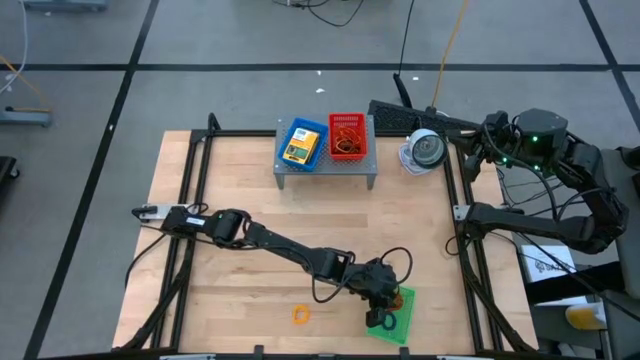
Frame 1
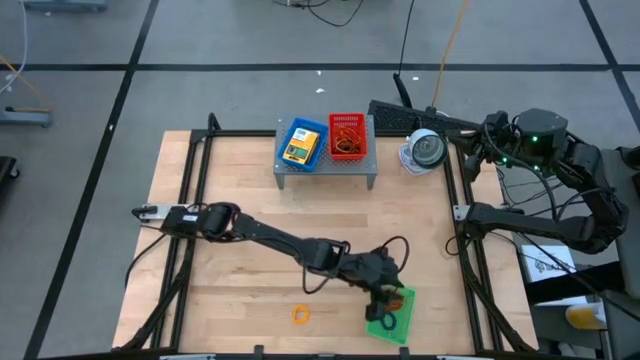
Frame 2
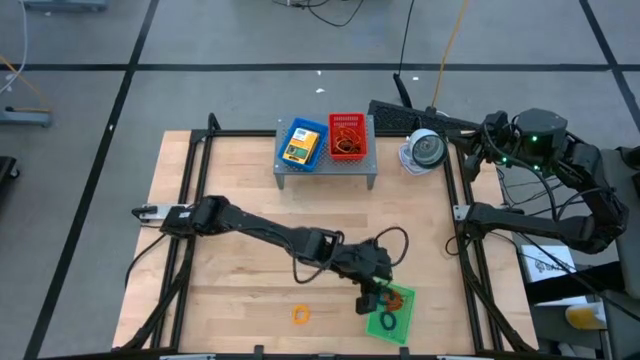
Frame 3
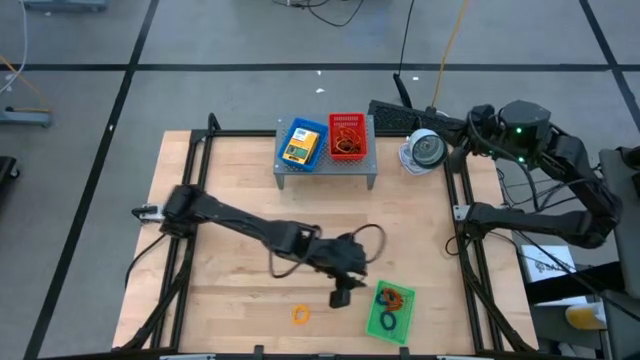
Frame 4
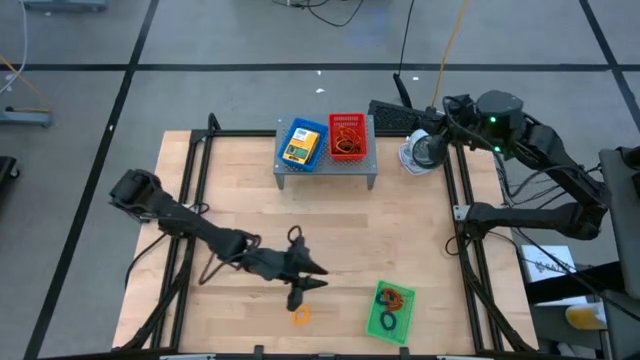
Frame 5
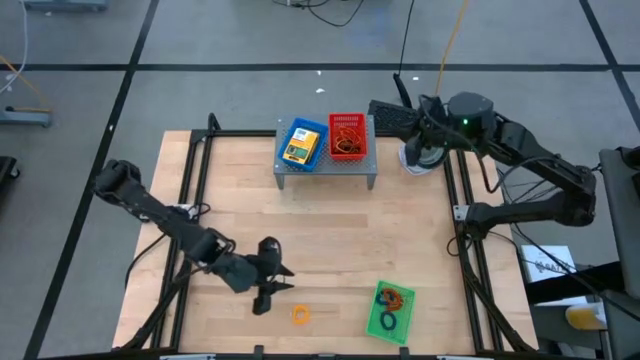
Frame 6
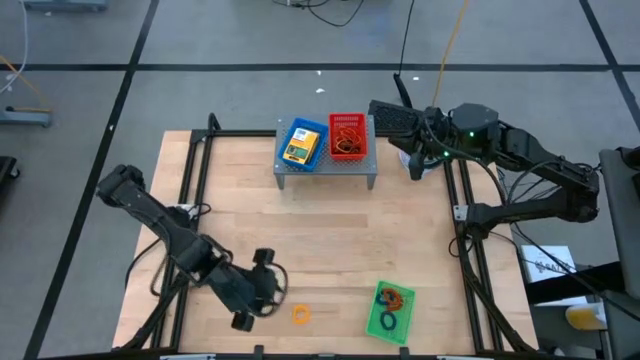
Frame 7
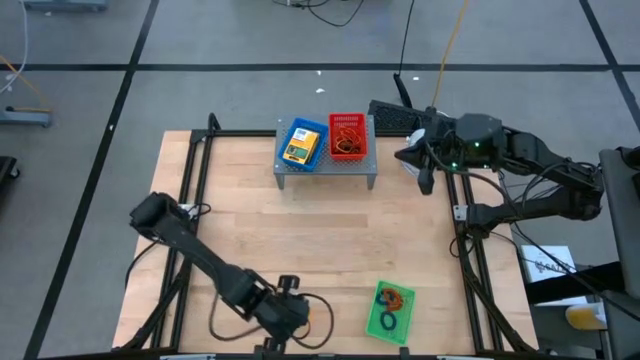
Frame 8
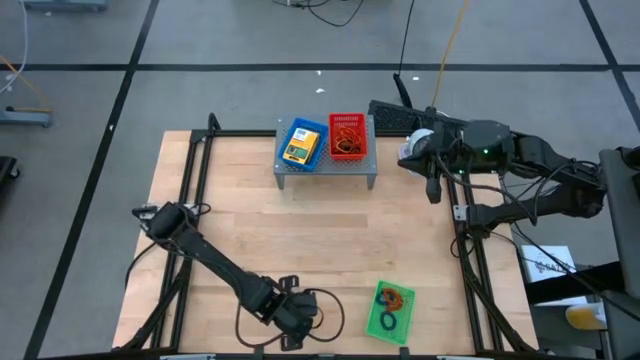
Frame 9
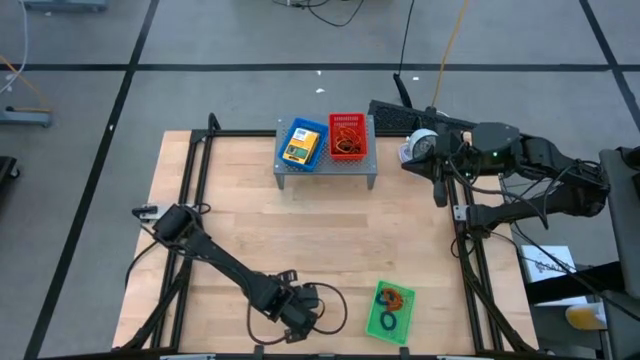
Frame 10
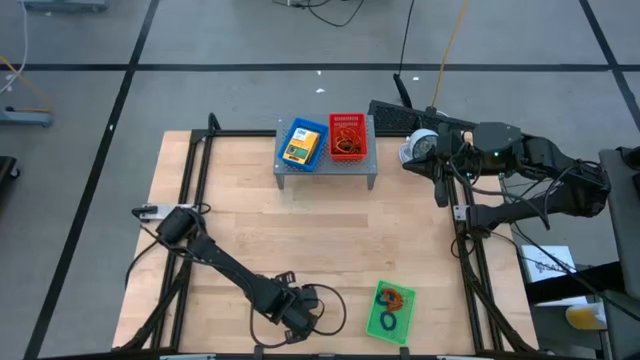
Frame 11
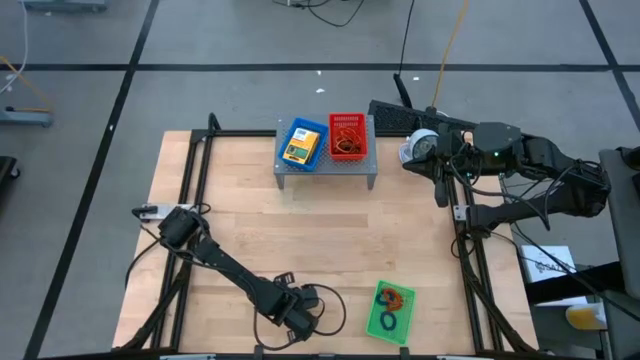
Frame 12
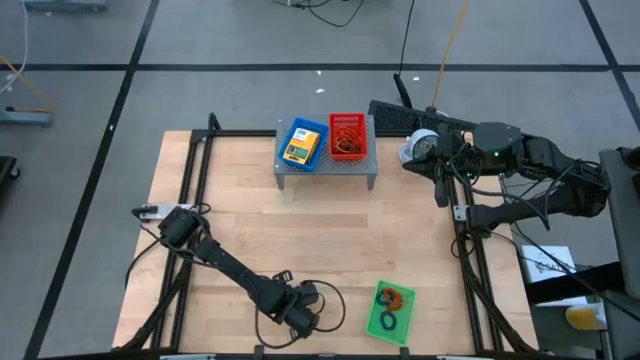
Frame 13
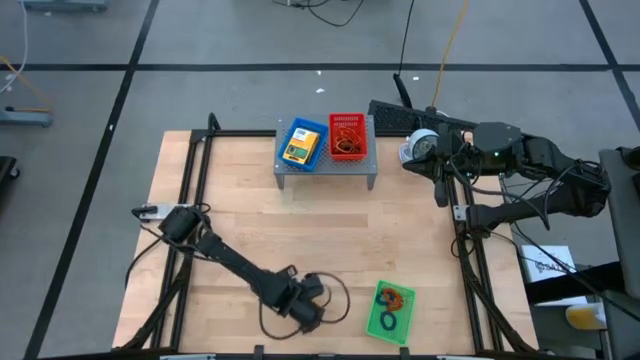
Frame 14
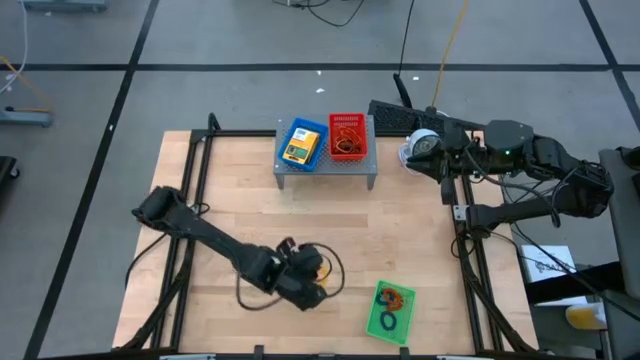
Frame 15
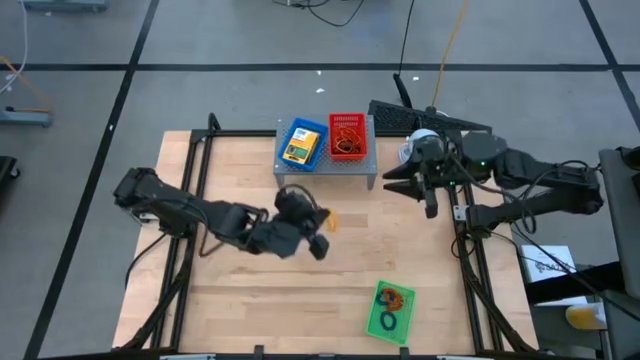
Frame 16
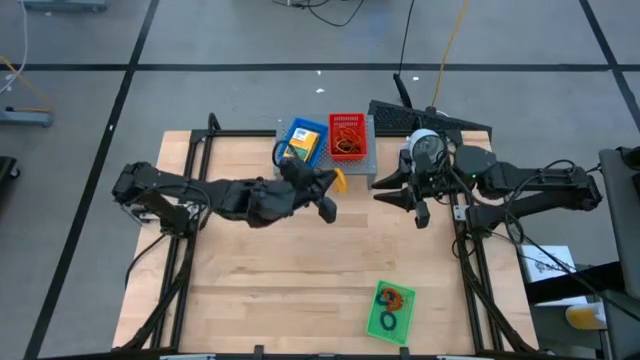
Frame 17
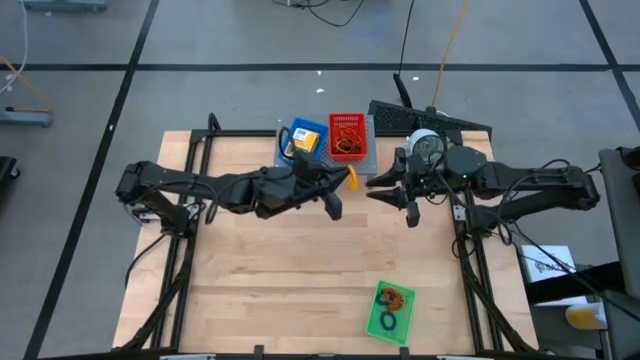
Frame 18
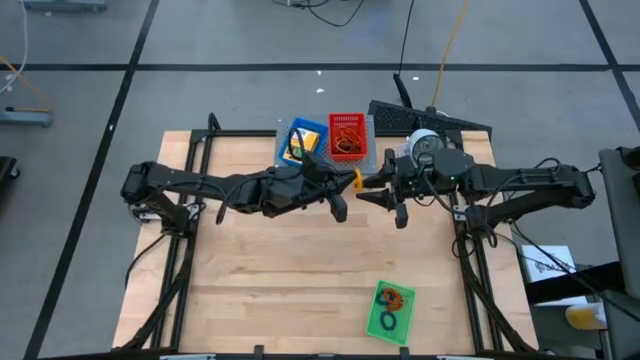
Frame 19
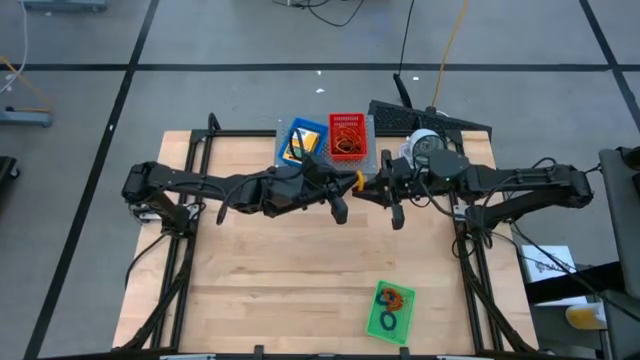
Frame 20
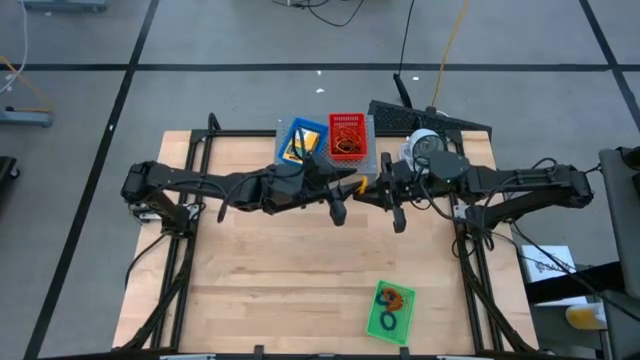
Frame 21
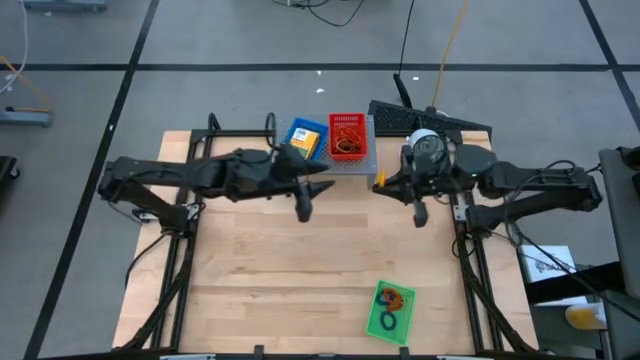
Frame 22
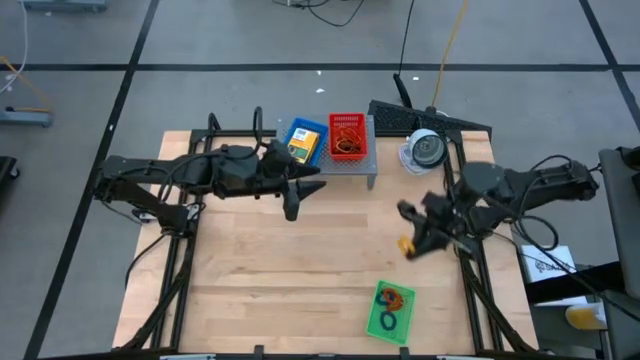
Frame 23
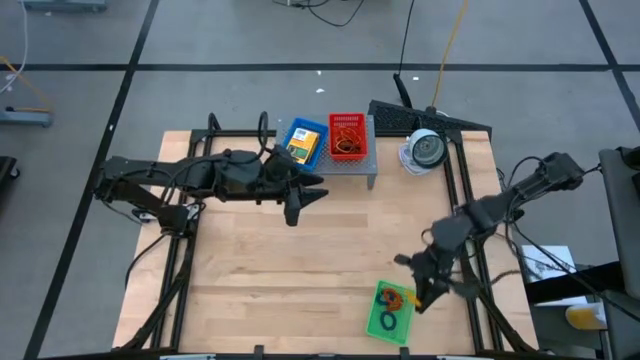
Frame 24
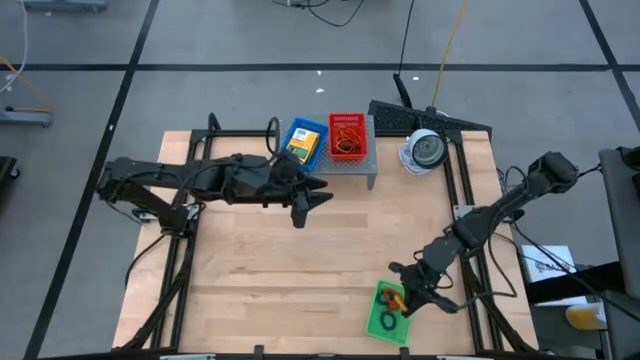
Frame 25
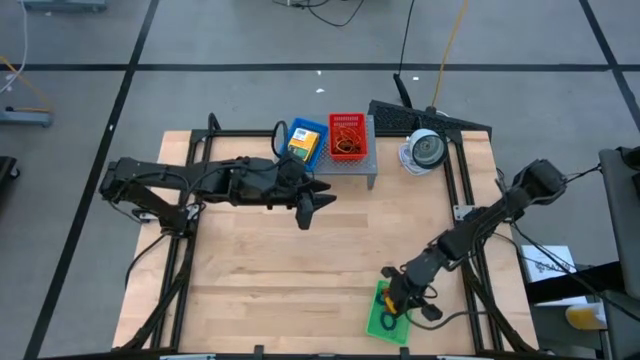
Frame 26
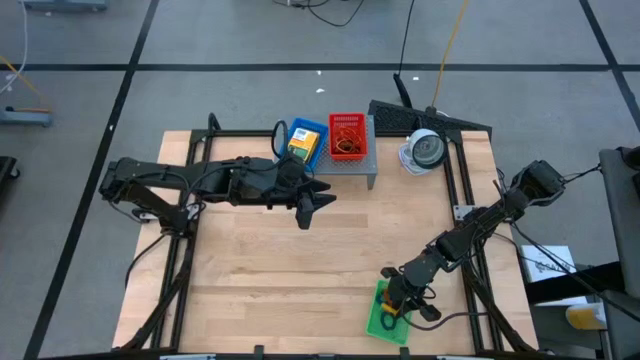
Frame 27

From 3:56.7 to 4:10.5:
Task: Pick & Place Office Desk Supplies
Put the yellow spring rubberband into the green bin

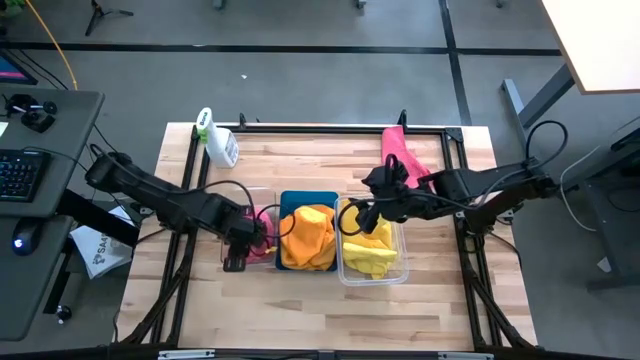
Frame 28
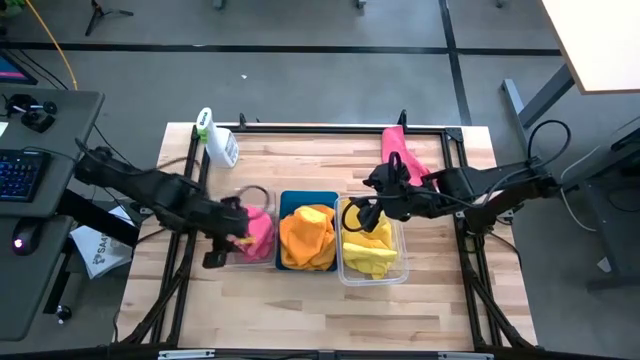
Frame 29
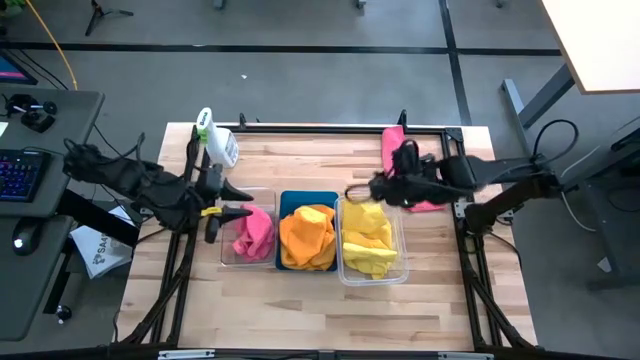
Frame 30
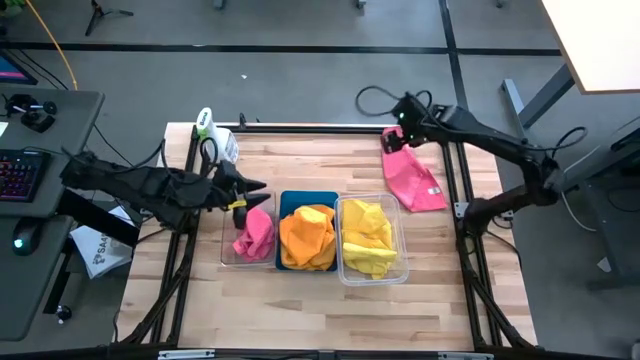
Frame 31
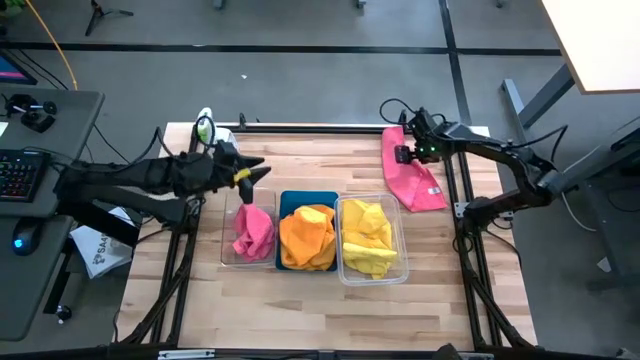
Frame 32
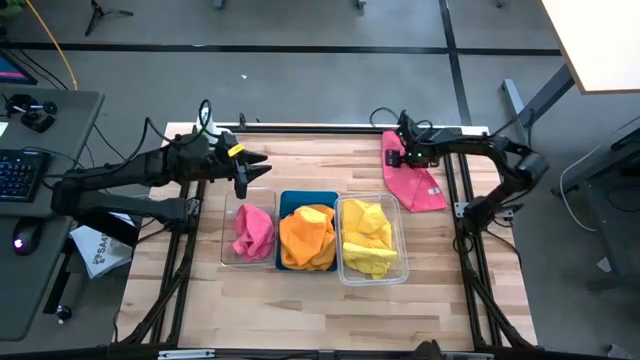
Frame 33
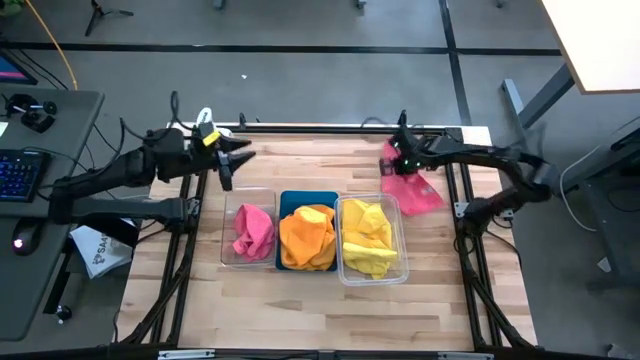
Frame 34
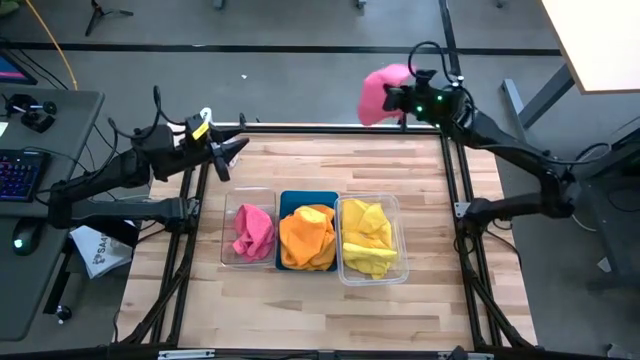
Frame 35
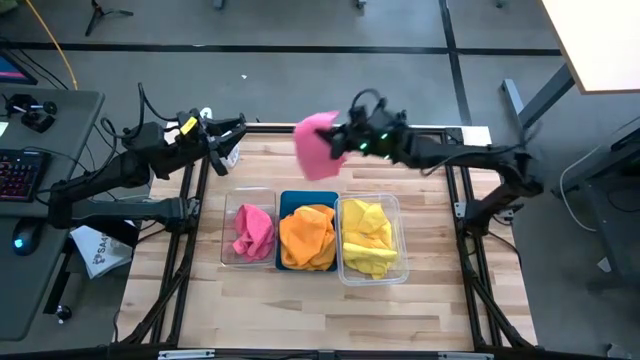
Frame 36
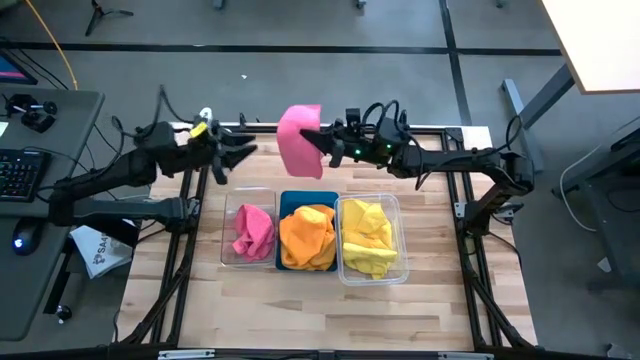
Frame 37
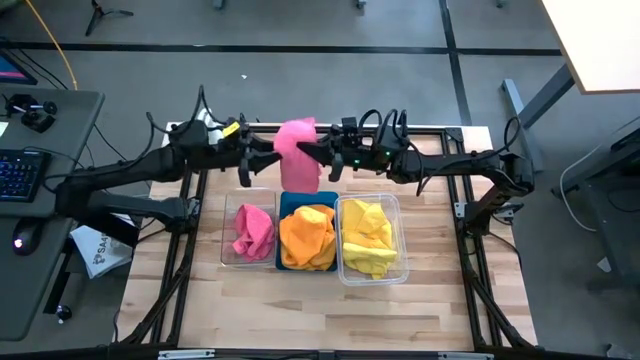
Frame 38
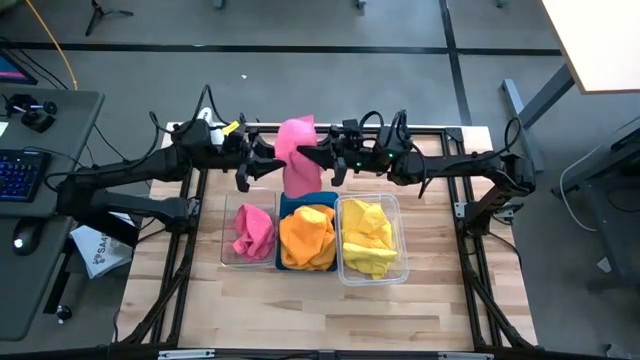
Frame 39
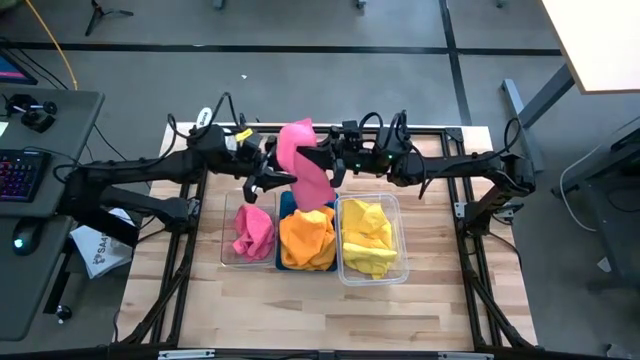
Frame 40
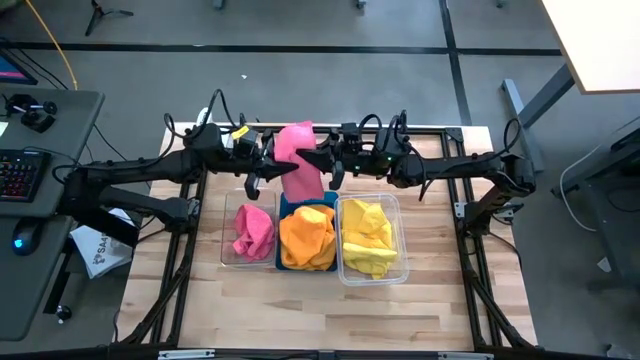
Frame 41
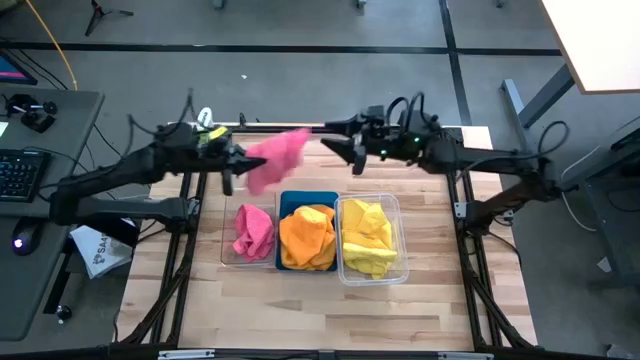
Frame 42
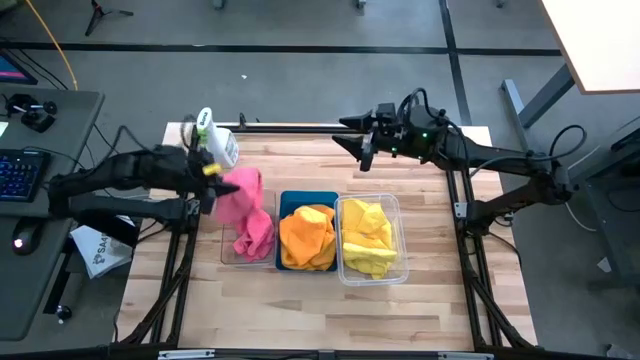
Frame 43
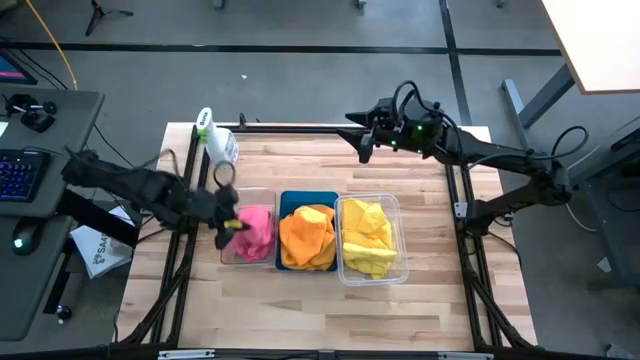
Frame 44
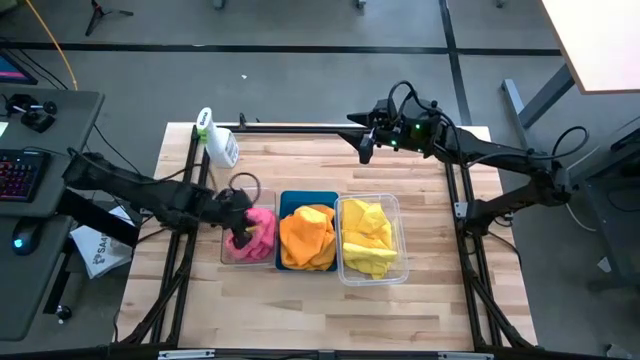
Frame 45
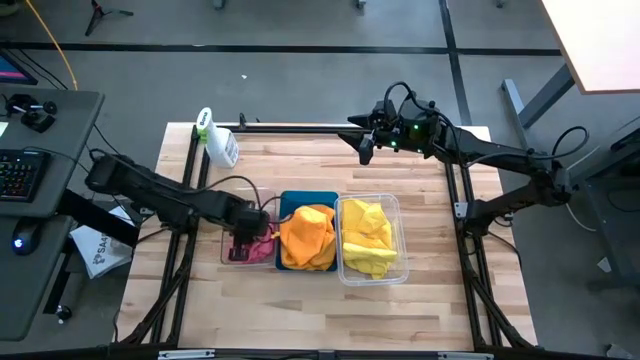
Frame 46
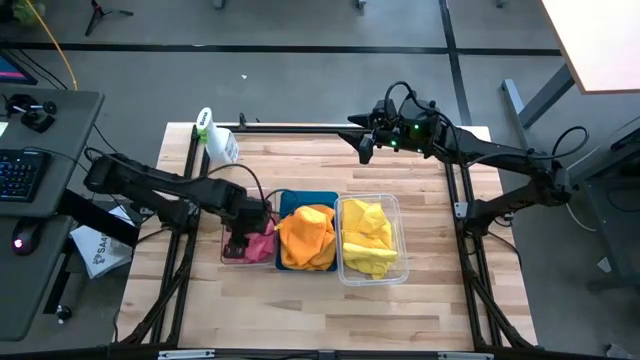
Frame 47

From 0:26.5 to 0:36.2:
Task: Sort microfiber towel by color & place in baskets
Put the pink microfiber towel into the left transparent bin
